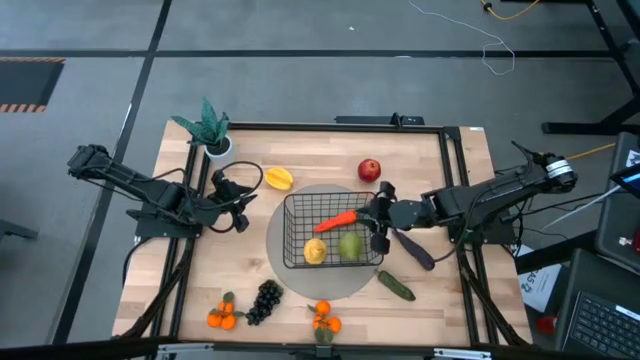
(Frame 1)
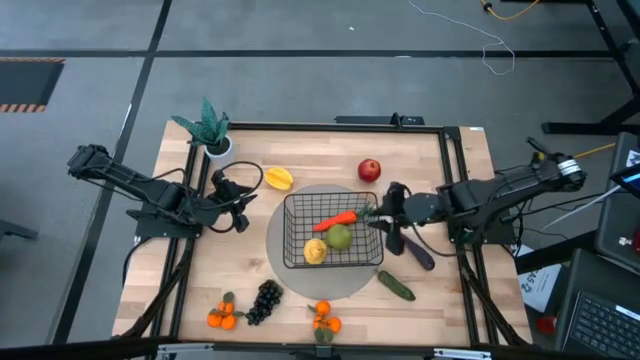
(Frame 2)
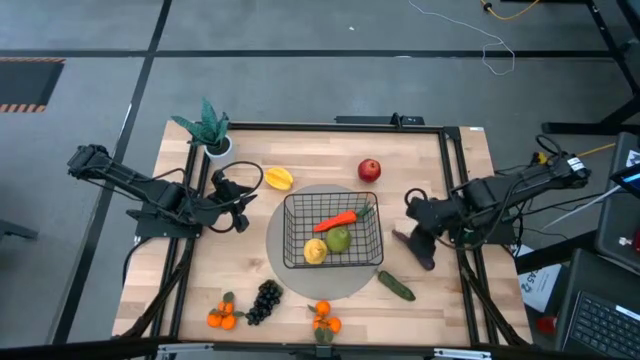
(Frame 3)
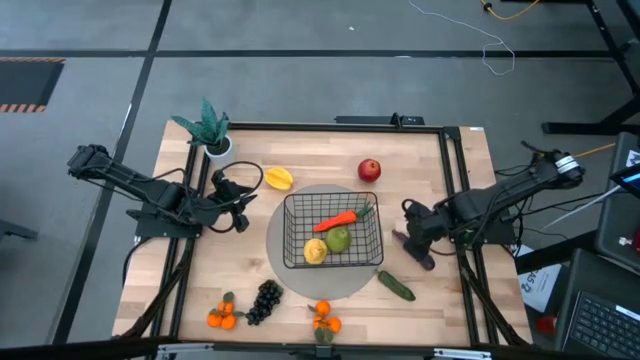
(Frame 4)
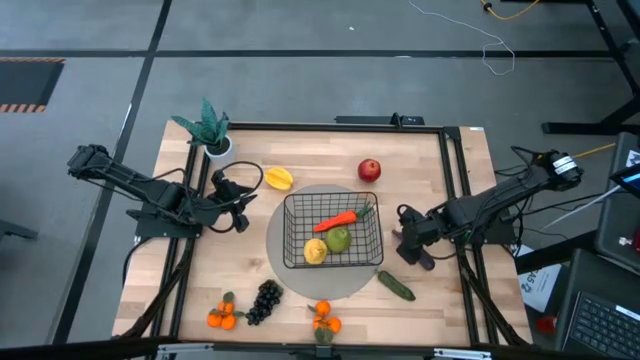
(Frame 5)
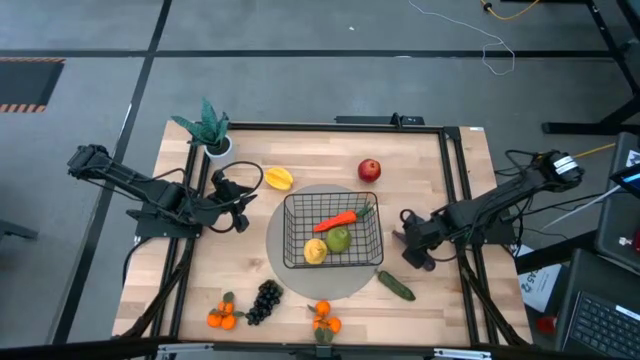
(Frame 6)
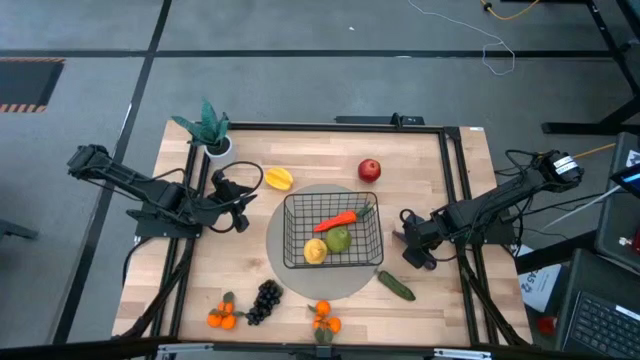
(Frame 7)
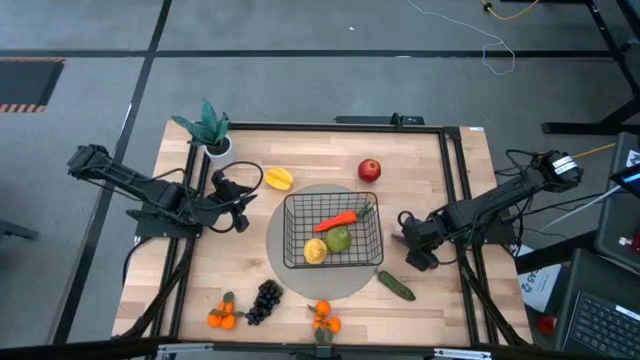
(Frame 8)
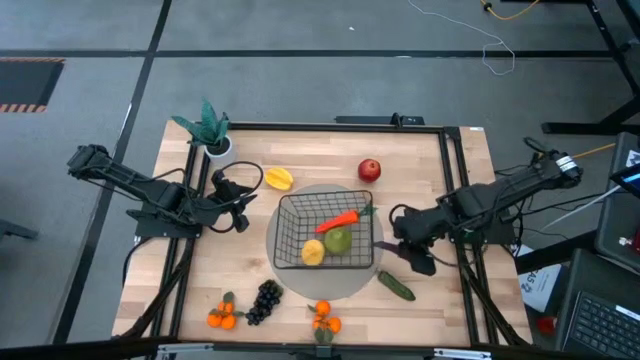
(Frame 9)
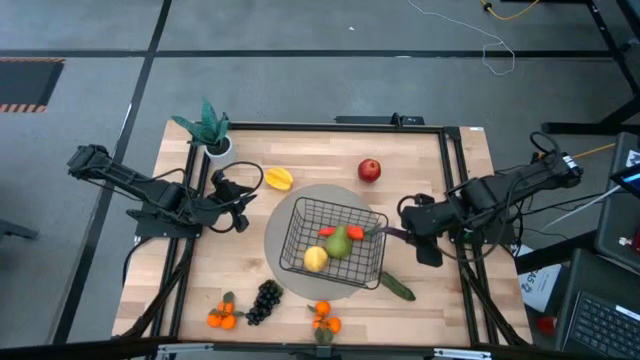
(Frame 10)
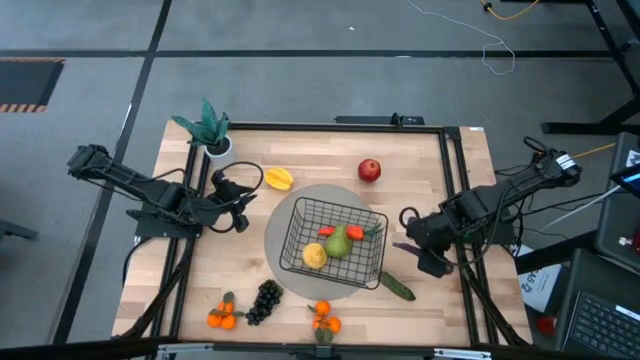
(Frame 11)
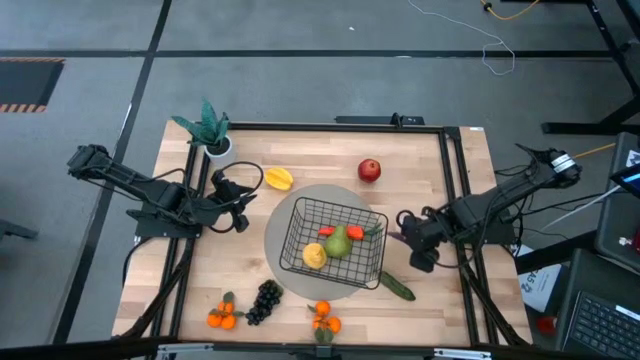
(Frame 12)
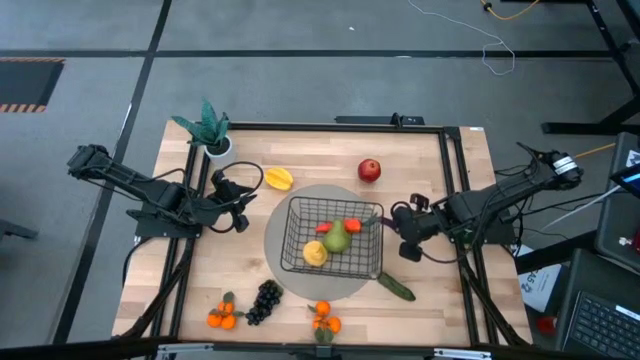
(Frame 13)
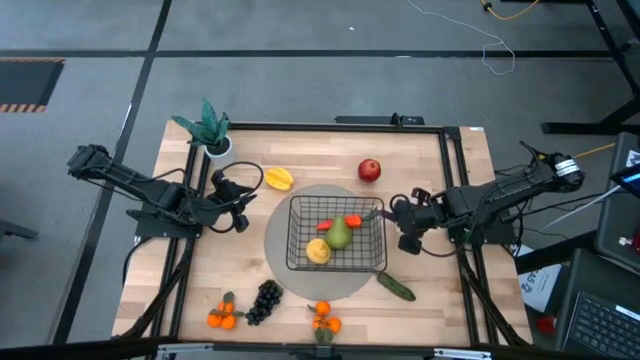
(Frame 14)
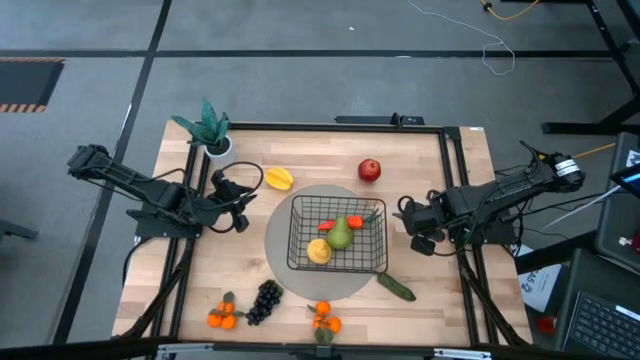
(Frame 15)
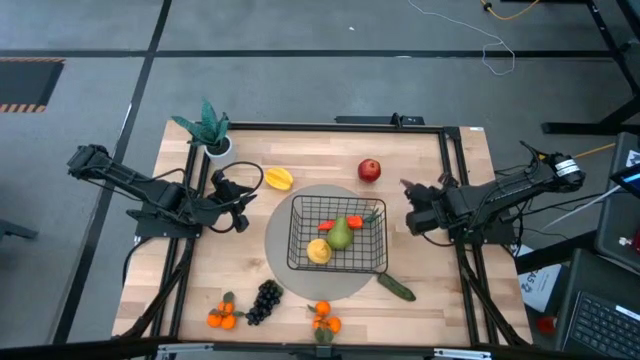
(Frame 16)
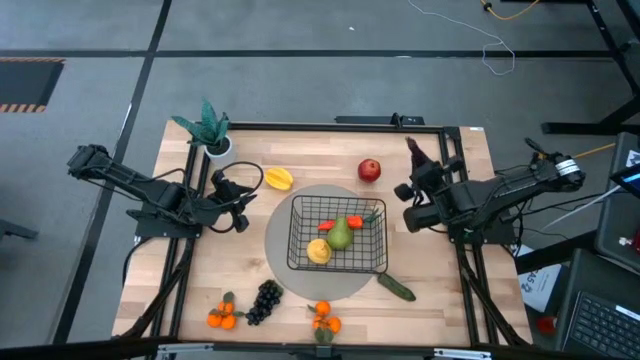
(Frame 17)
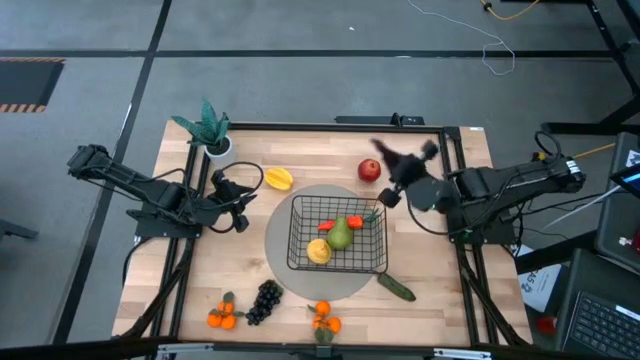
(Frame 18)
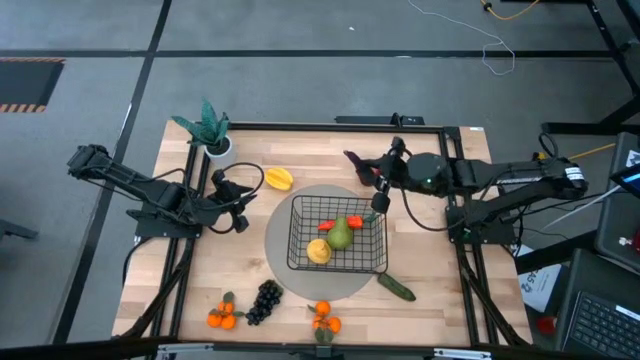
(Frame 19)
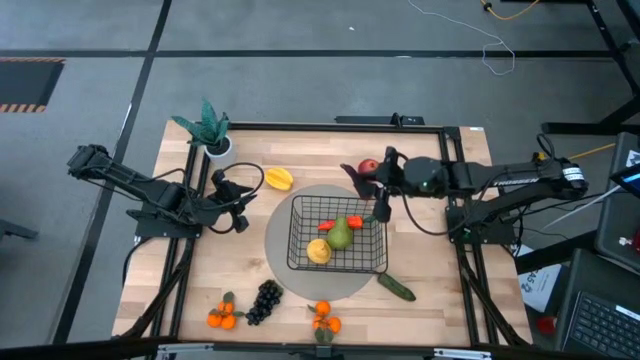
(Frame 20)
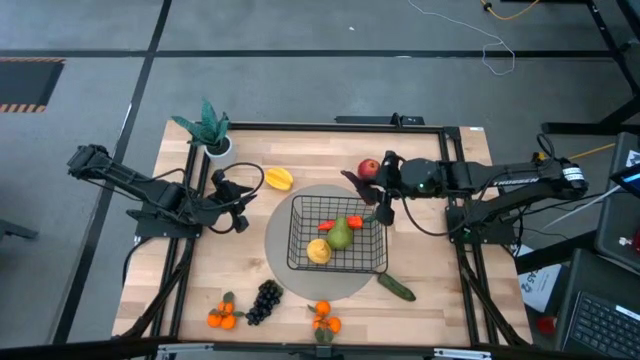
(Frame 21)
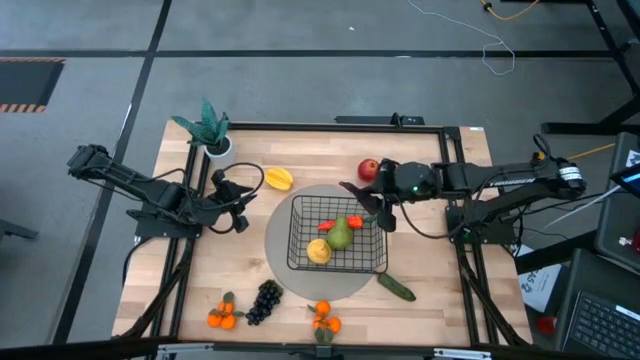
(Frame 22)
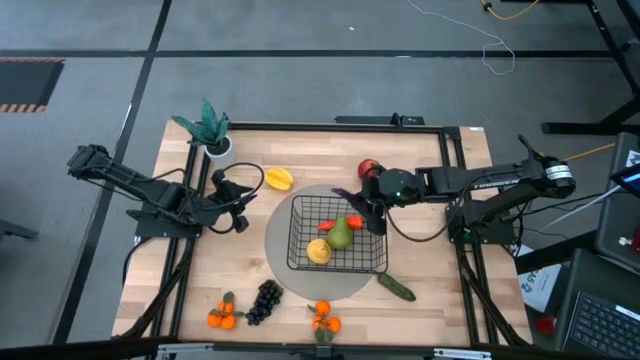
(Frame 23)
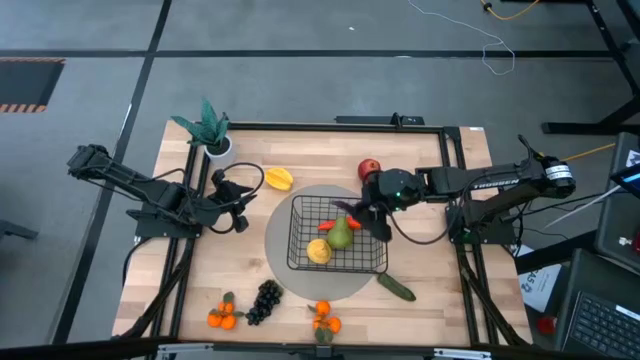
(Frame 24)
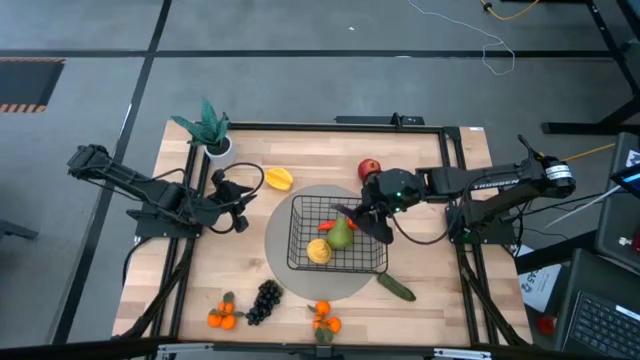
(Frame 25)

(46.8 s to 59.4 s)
Task: Build produce basket
Put the purple eggplant into the wire basket

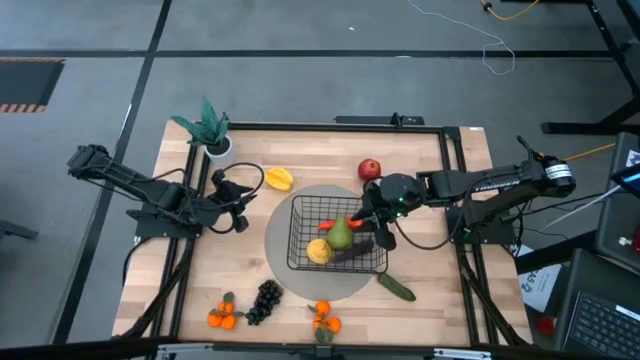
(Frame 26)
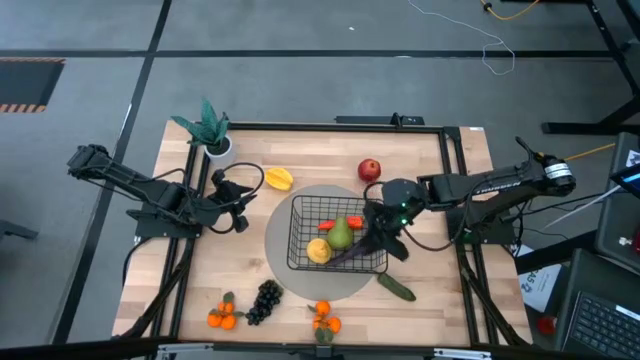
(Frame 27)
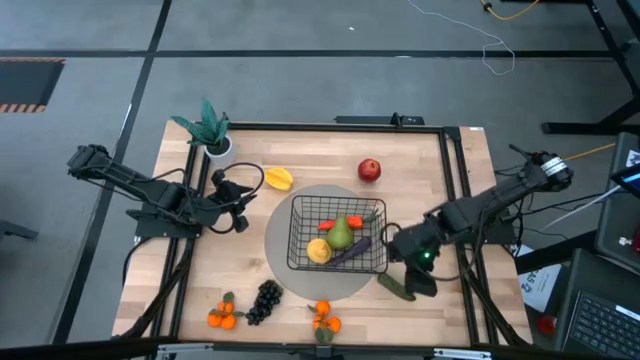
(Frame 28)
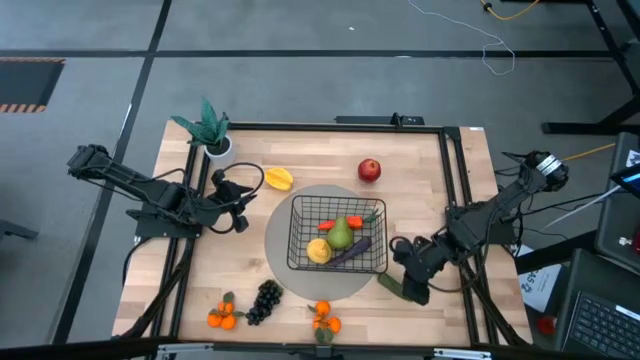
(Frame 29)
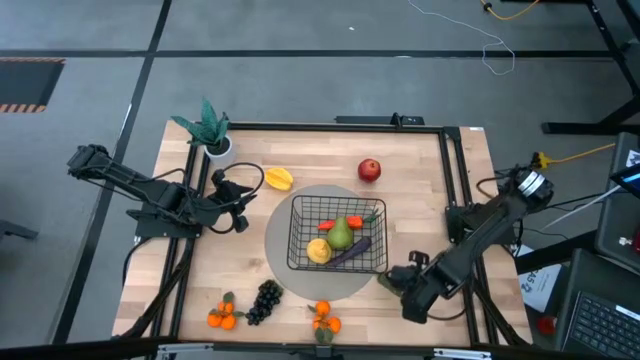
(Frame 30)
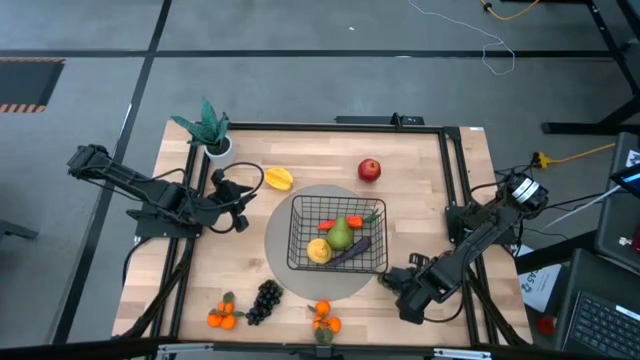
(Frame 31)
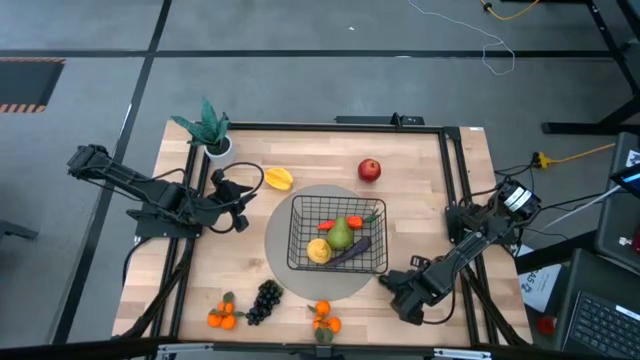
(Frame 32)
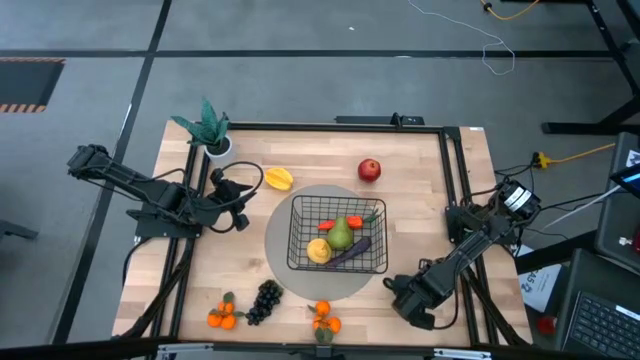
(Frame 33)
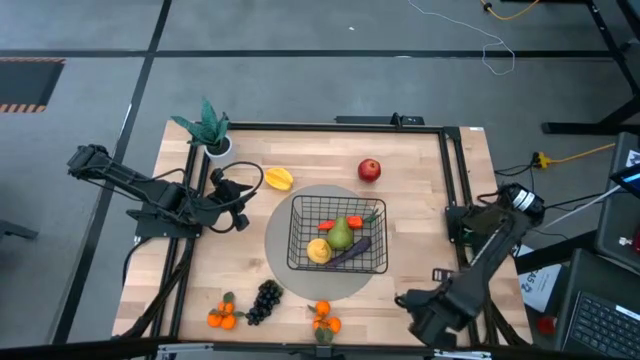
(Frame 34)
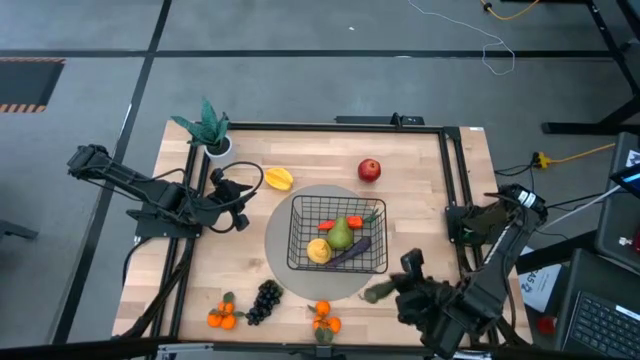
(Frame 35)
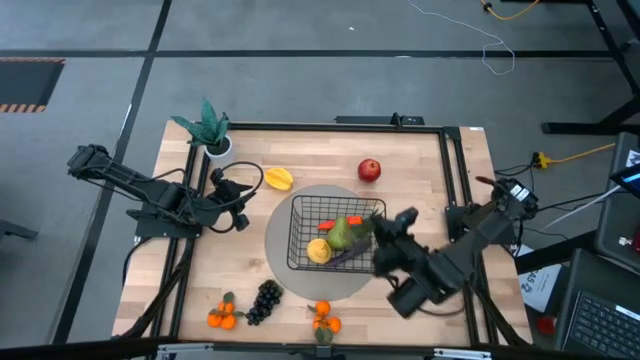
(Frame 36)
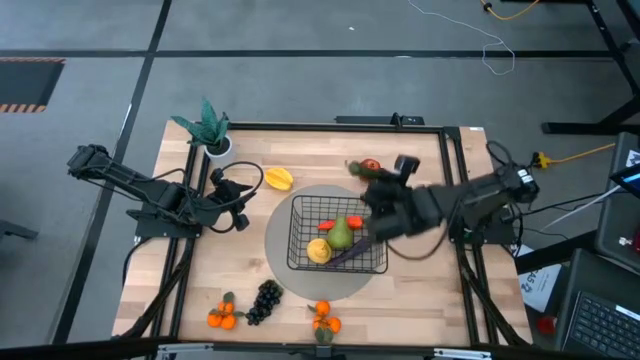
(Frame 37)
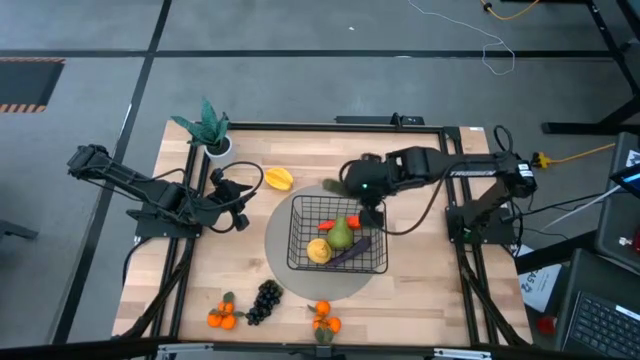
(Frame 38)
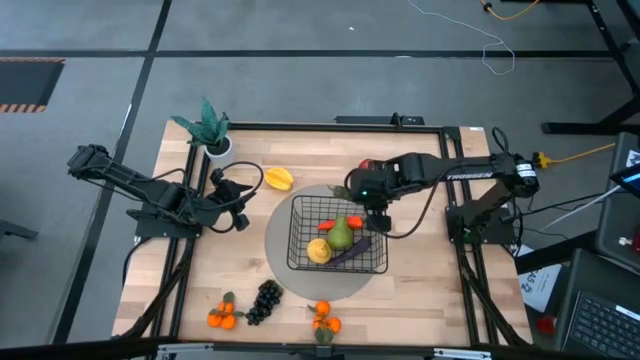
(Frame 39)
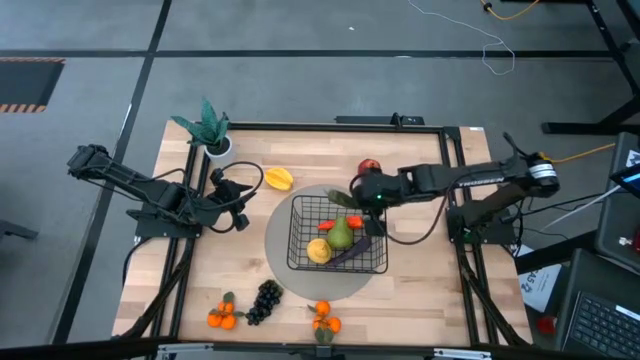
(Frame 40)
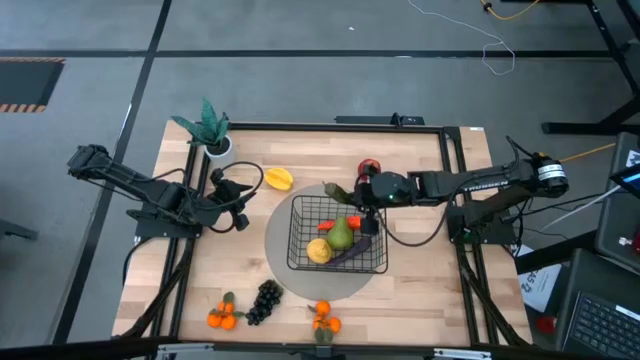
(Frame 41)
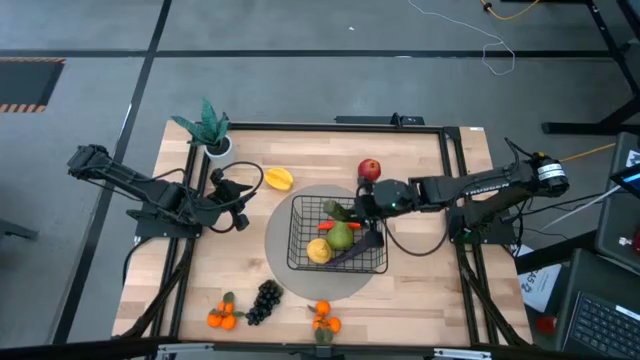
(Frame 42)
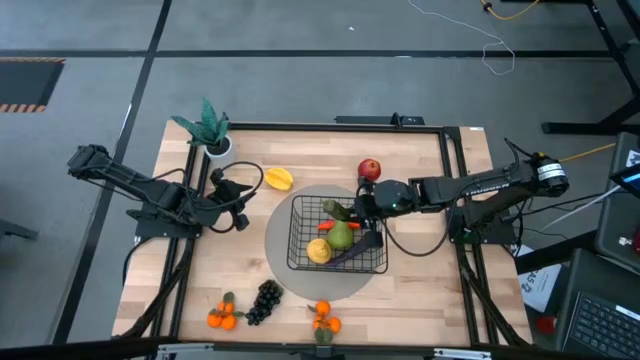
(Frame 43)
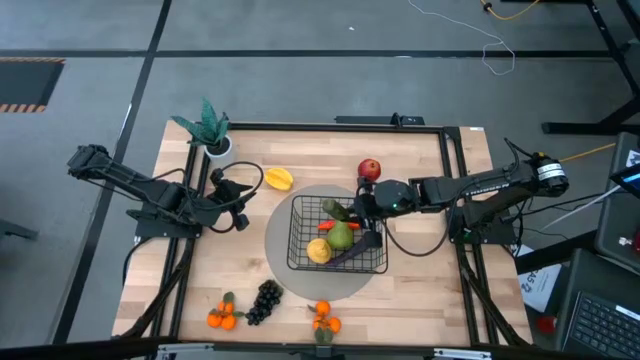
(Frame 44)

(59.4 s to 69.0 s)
Put the green chili pepper into the wire basket
